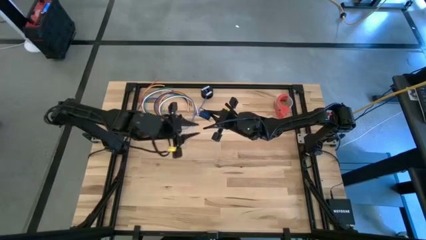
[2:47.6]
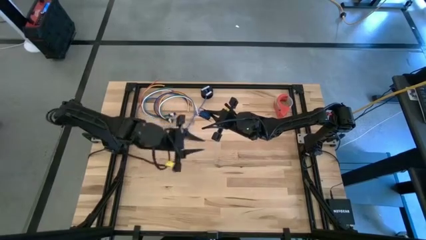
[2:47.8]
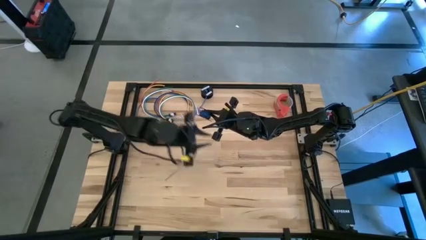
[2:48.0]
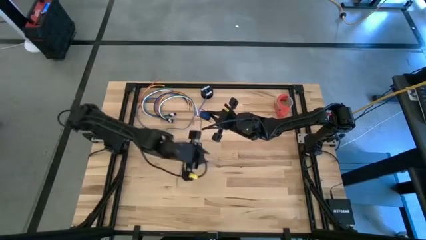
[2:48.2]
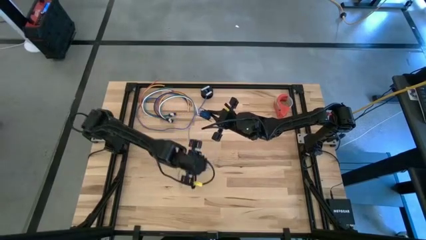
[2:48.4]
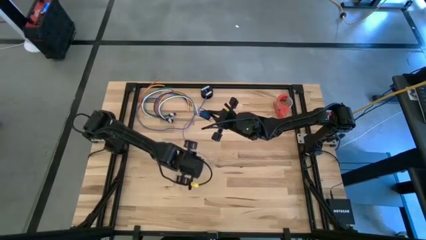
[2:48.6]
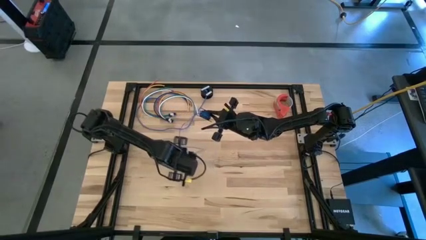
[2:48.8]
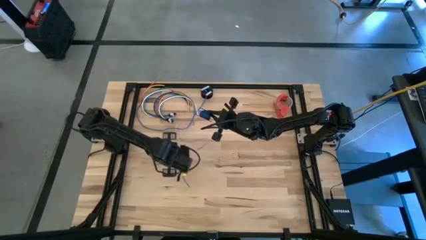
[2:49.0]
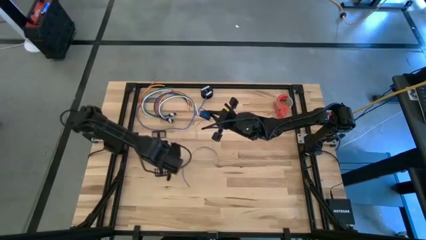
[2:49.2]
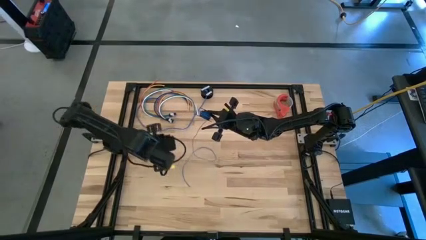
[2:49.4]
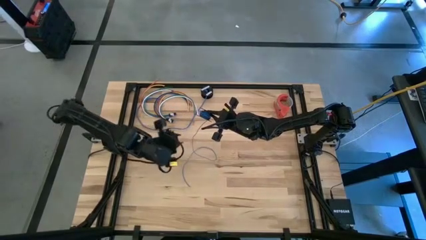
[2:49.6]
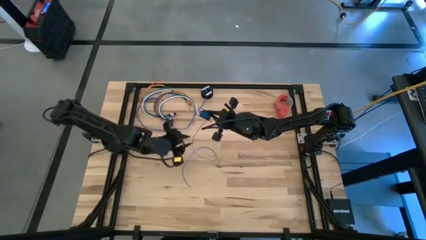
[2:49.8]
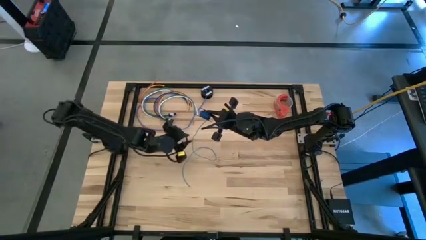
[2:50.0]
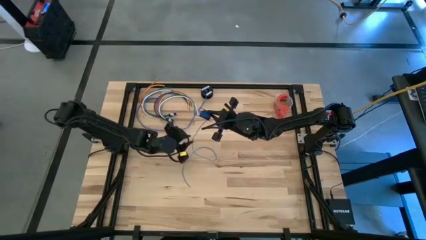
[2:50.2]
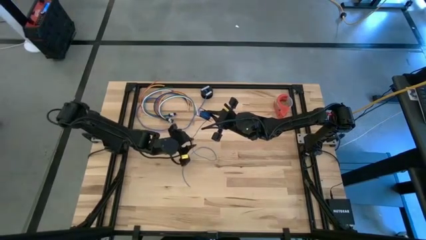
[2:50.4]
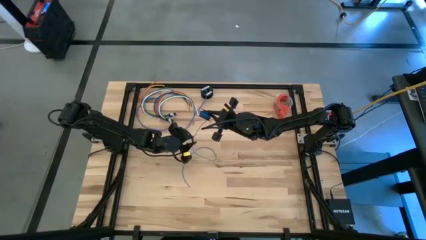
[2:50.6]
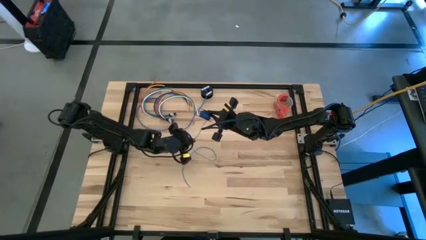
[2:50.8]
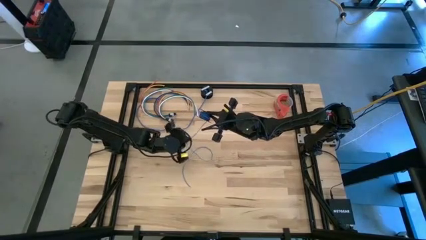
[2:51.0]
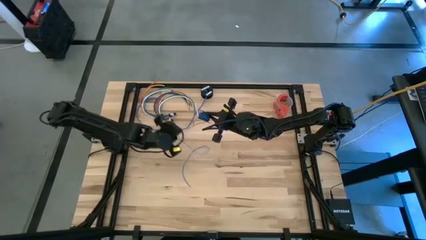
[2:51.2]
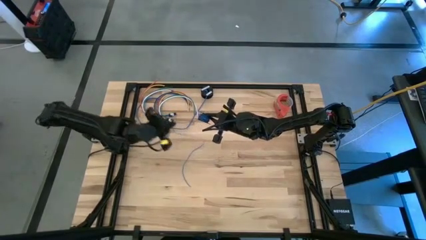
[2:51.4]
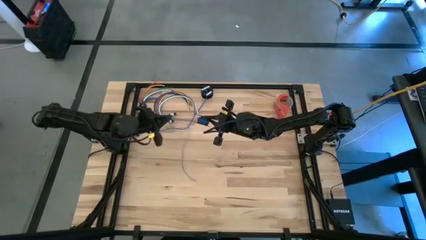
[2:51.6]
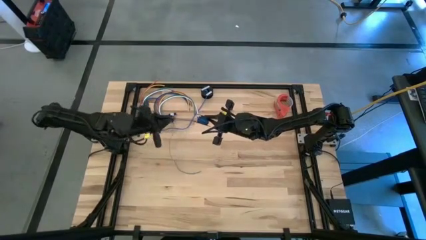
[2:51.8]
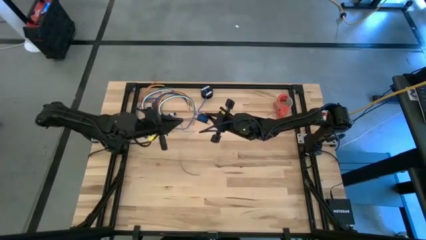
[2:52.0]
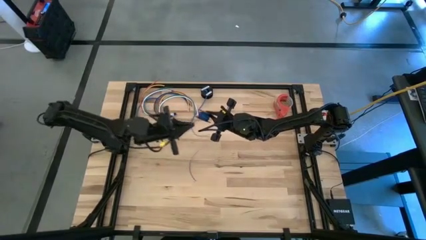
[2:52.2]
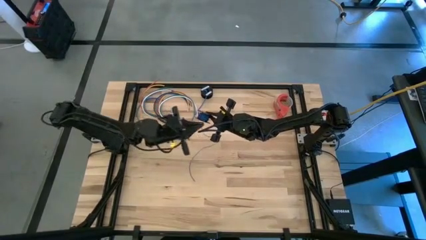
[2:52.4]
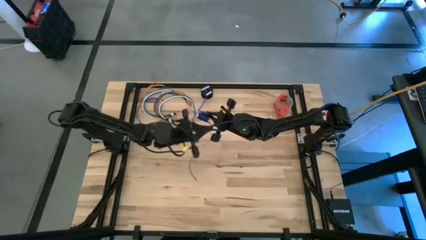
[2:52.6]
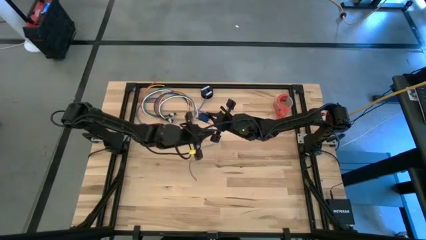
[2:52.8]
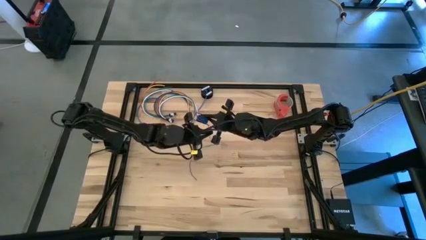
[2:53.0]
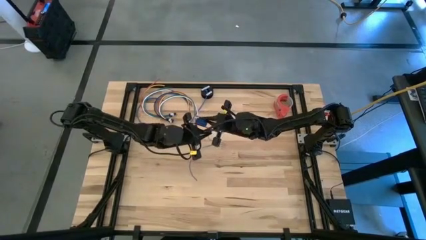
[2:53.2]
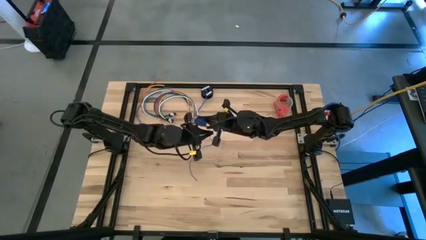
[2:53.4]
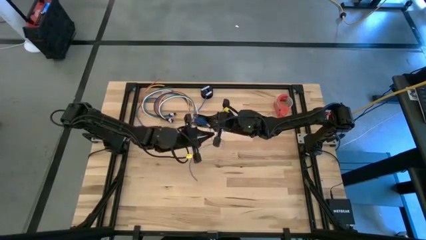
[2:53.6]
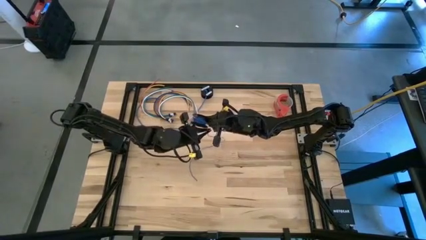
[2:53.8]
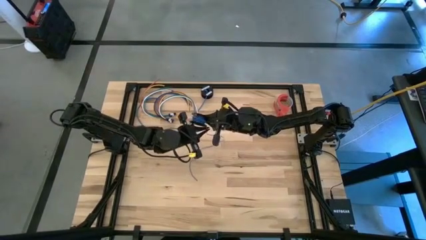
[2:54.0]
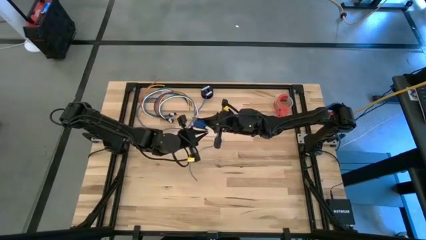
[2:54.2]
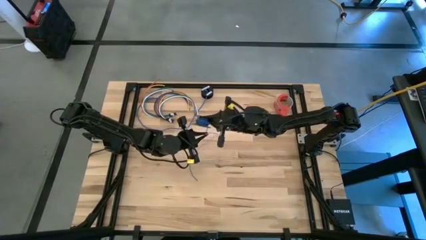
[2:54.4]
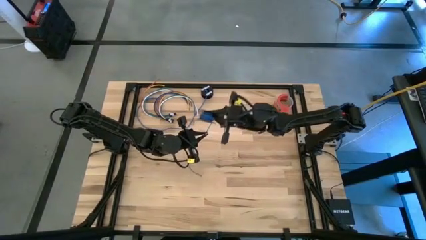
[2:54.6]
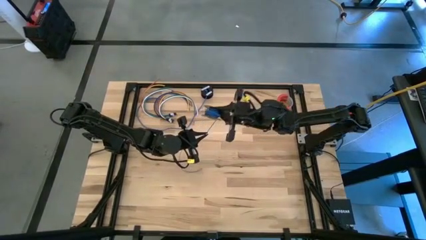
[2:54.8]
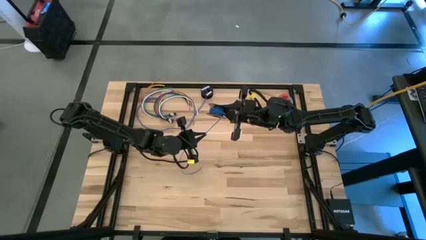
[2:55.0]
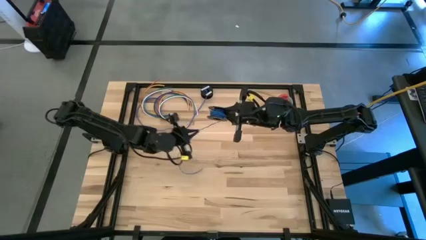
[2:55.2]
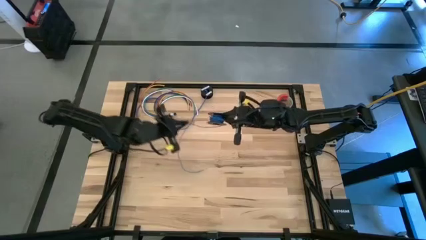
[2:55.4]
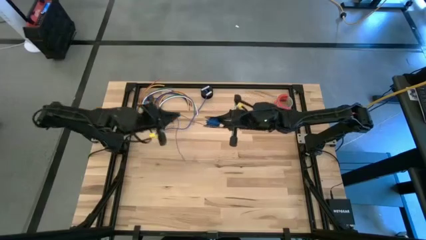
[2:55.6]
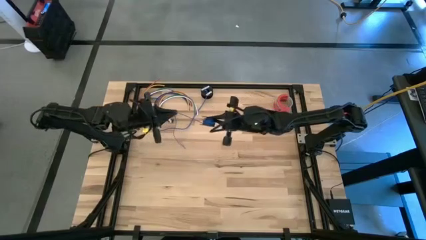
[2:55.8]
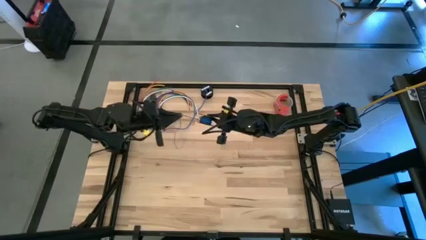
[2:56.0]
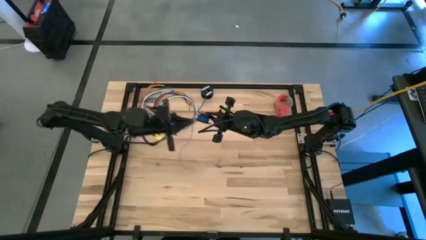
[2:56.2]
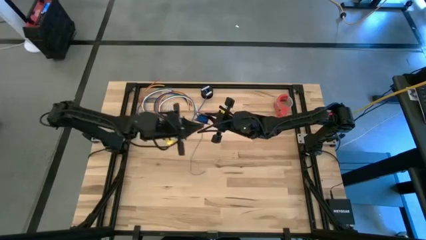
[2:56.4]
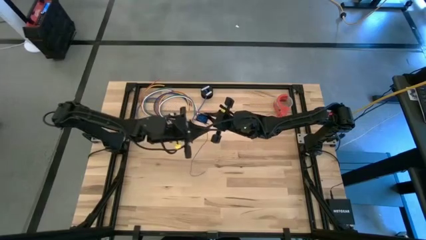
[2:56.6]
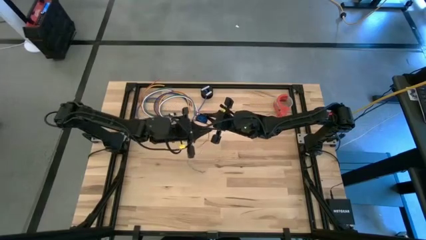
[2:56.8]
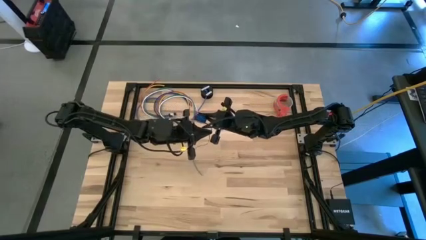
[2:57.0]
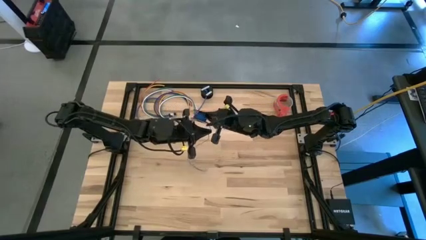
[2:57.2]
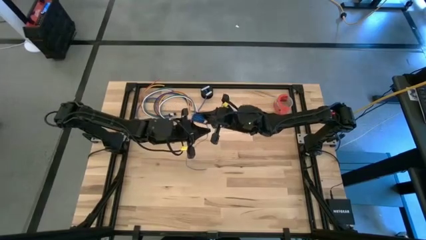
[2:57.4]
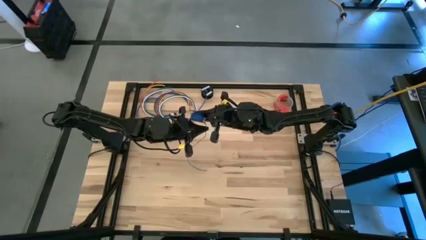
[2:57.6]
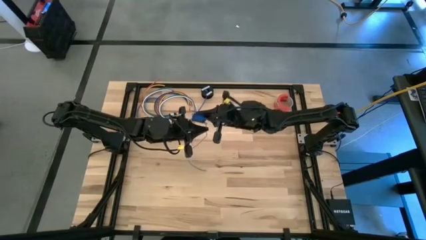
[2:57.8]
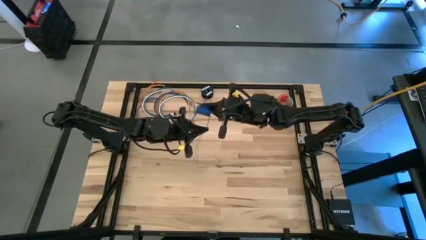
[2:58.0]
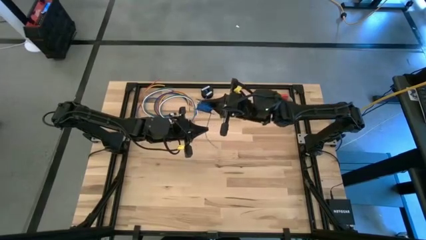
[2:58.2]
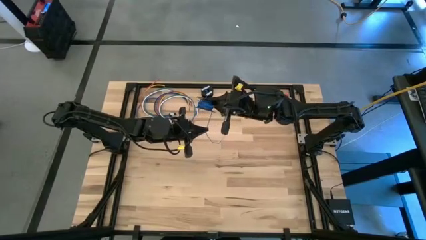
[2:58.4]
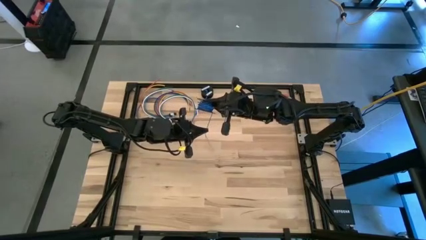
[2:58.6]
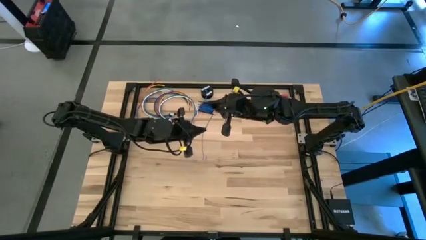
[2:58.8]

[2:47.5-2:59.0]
Task: Coil cords
Coil the blue wire onto the spool

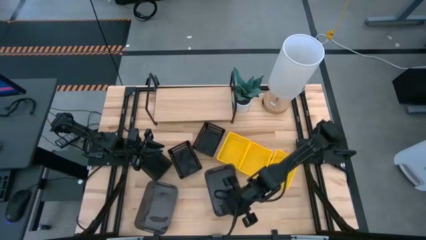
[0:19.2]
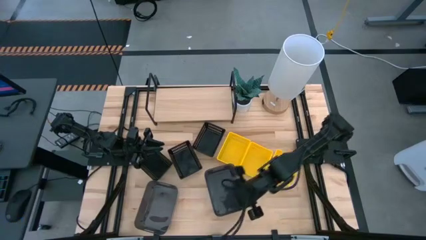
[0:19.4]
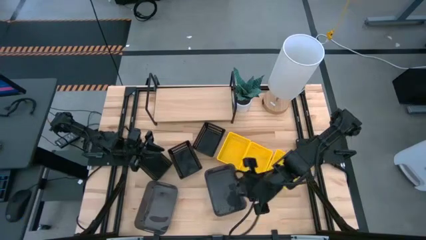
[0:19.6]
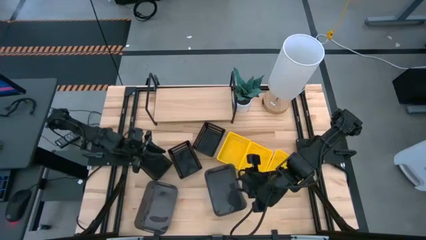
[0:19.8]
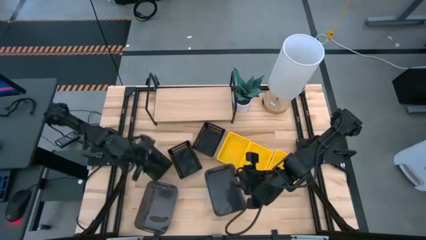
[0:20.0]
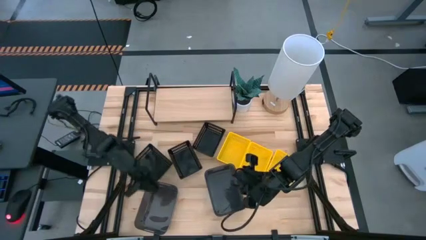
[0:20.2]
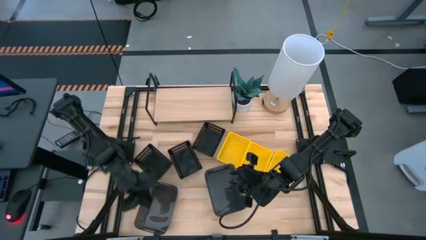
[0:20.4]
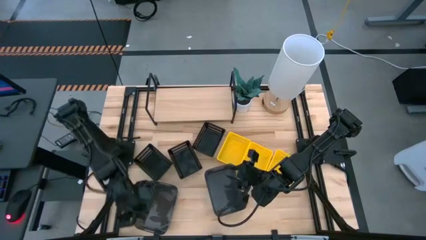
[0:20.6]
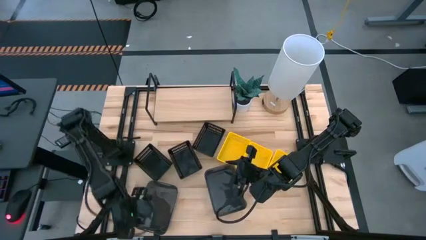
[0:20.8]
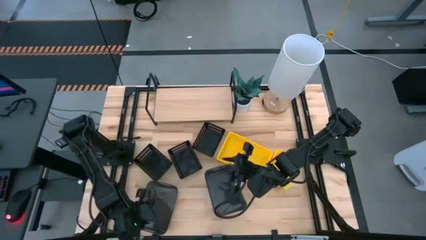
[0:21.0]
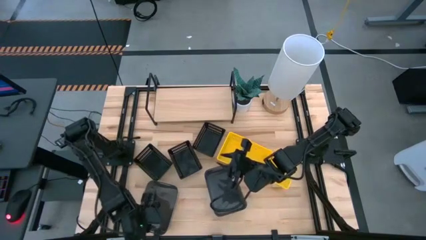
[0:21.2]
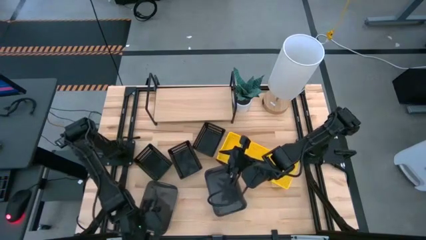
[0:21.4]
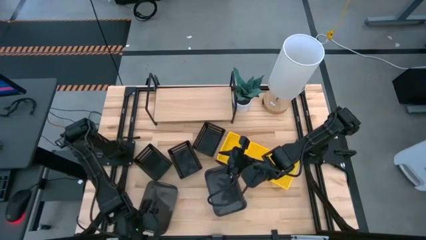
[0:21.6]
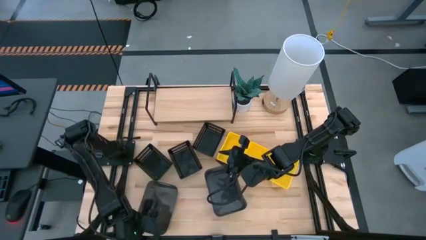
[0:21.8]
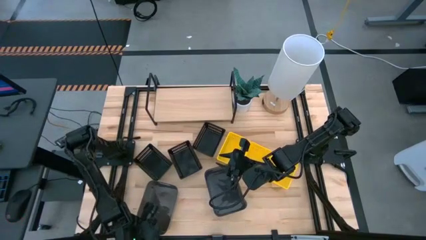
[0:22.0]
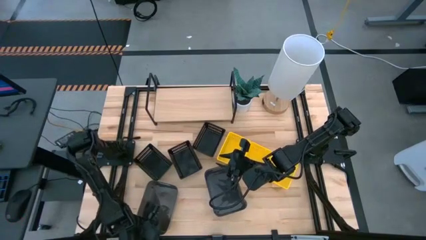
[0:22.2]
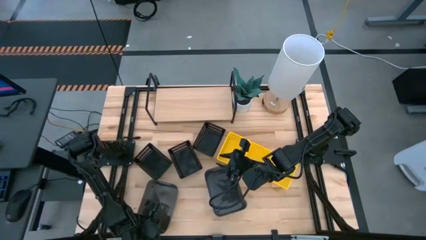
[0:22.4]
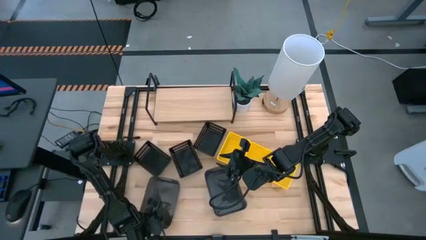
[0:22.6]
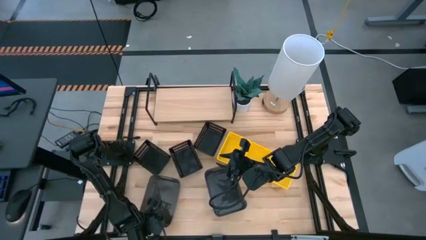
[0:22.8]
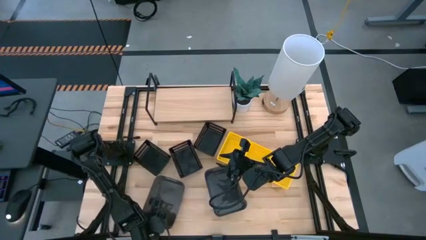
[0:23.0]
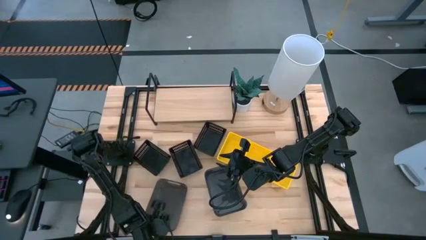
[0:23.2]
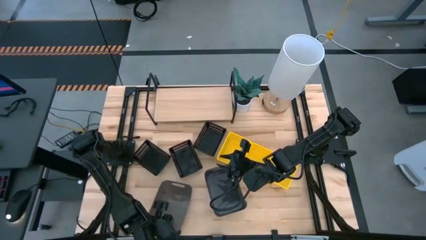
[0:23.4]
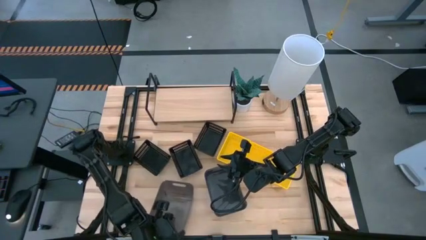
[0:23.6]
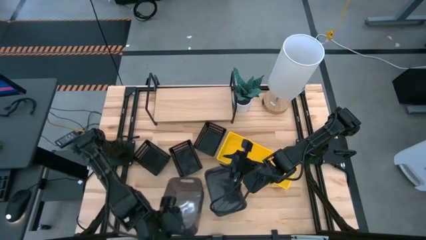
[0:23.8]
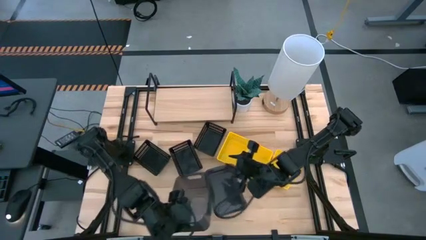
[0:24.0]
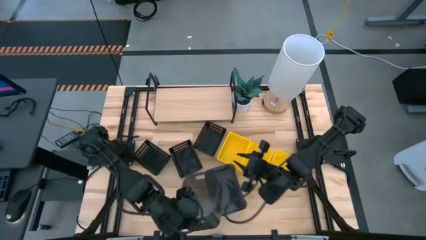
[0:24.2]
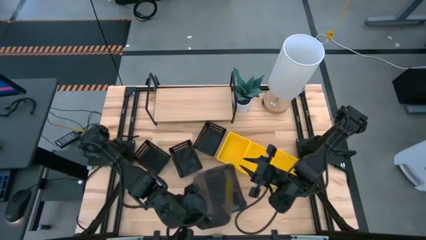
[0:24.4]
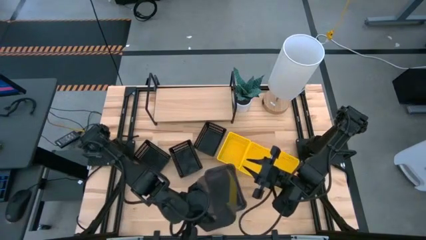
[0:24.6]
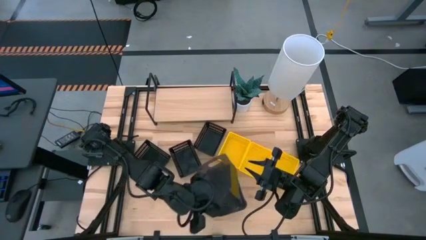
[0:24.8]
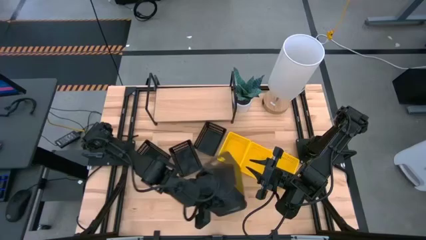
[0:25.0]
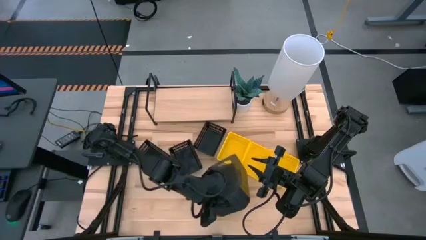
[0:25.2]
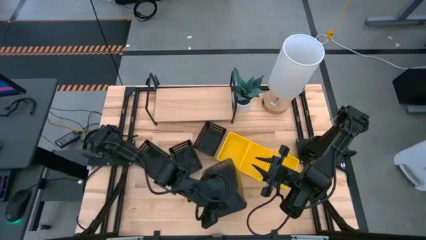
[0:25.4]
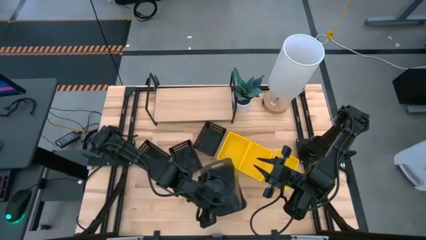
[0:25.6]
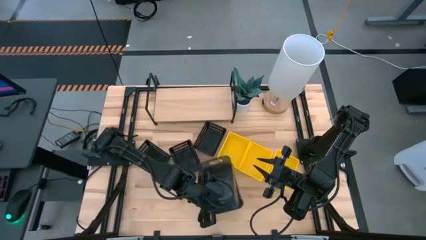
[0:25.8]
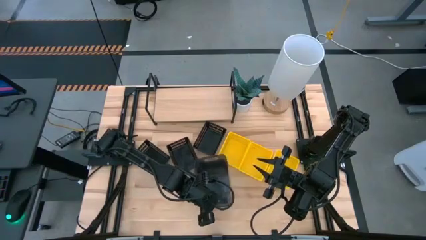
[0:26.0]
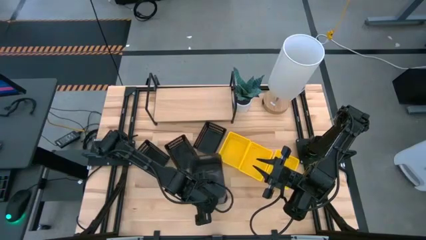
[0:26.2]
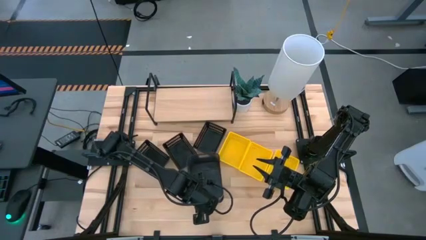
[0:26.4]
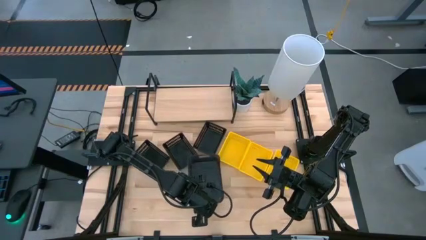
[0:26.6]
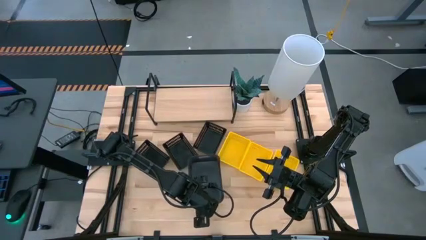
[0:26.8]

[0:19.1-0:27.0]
Task: Stack baskets on shelf by color
Stack the gray bin on top of the stacked gray bin
